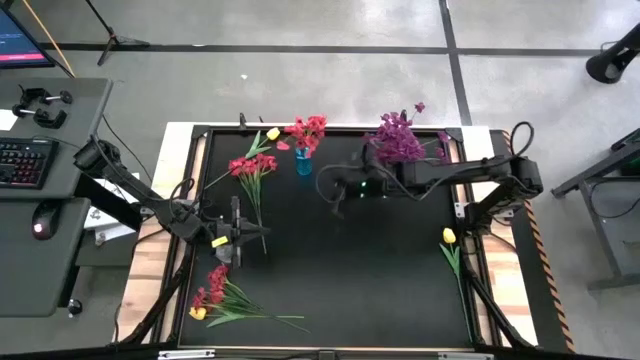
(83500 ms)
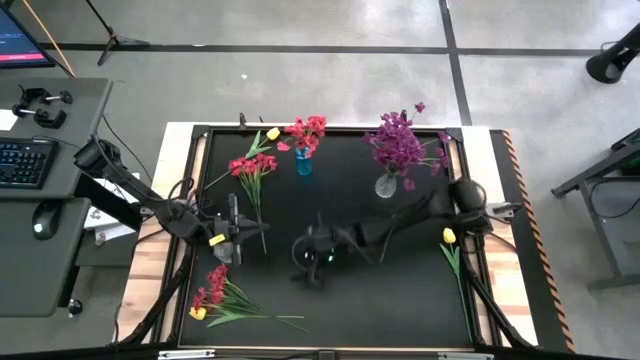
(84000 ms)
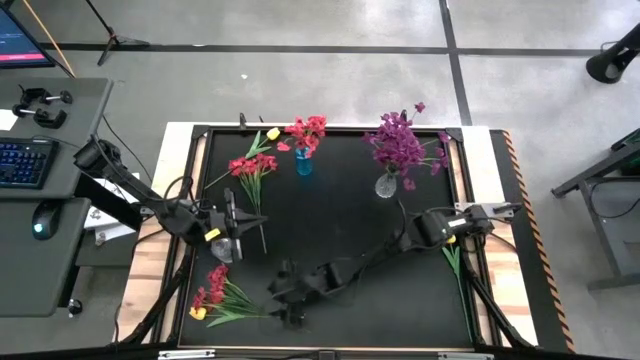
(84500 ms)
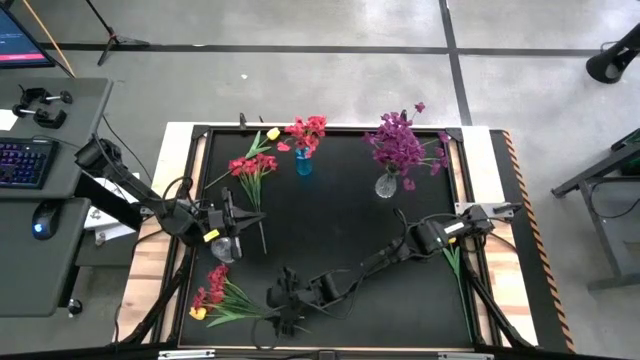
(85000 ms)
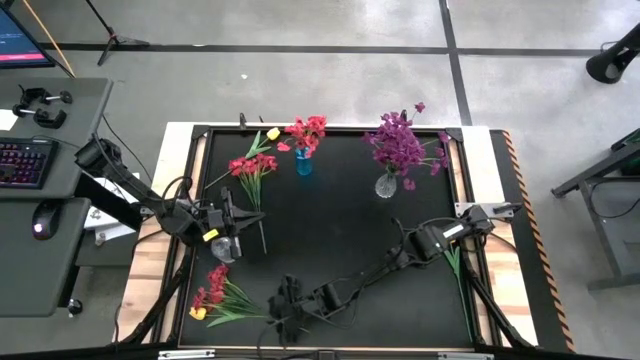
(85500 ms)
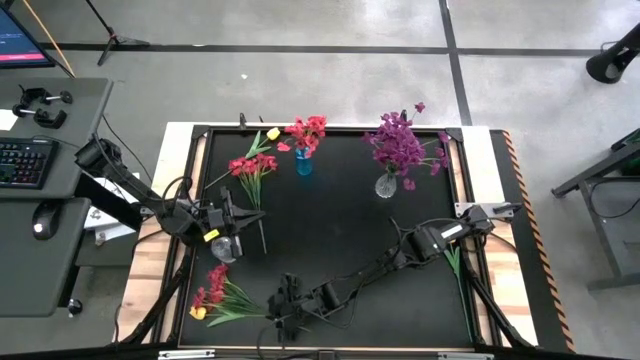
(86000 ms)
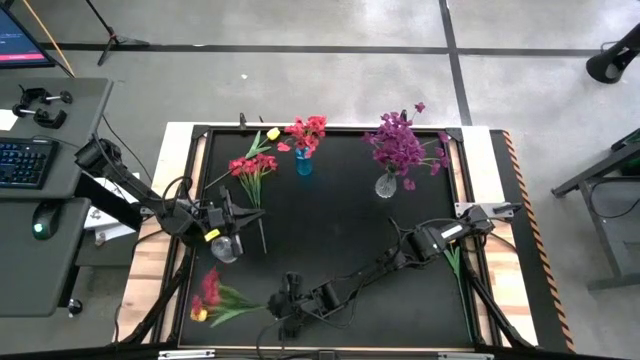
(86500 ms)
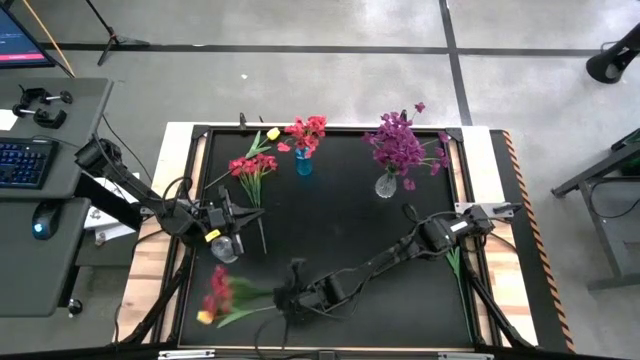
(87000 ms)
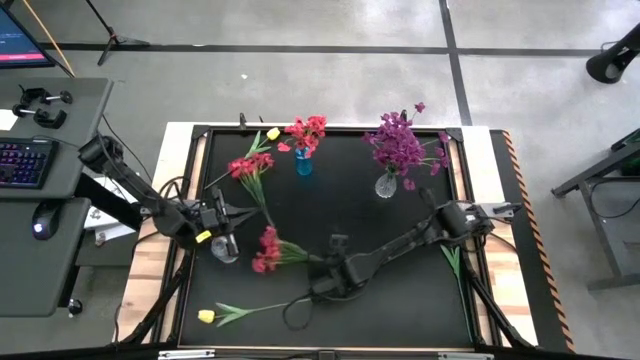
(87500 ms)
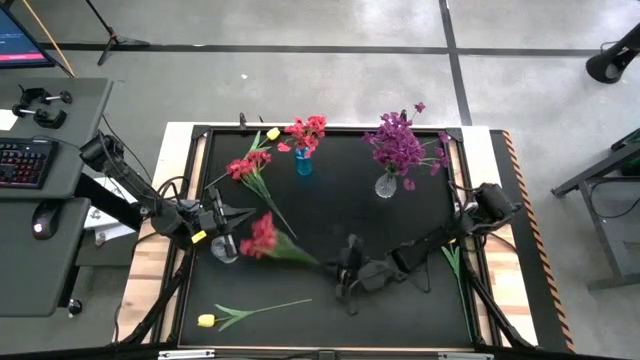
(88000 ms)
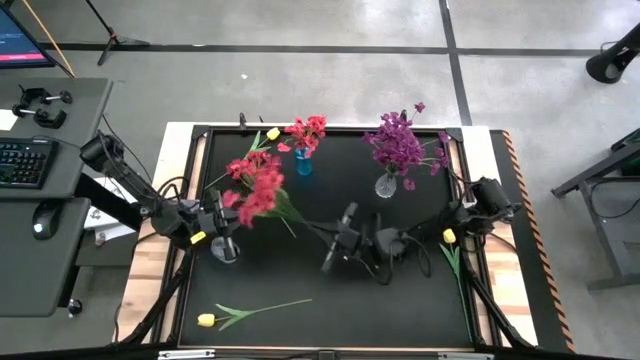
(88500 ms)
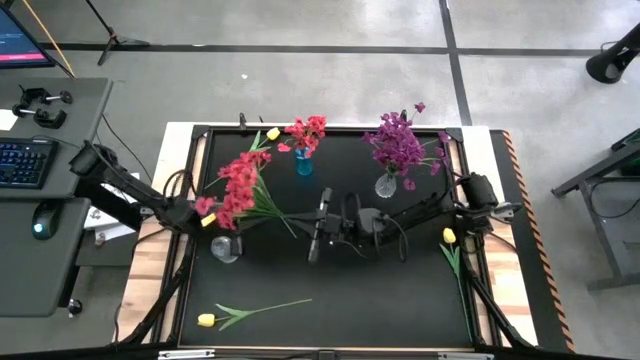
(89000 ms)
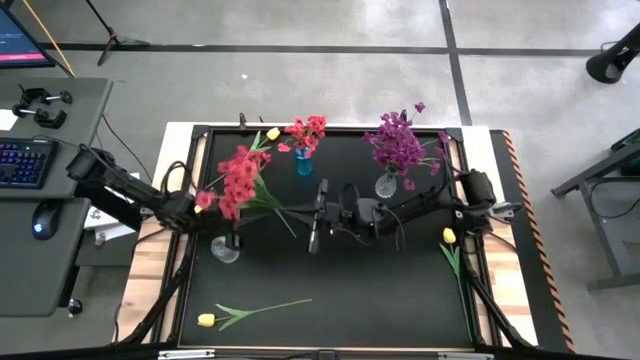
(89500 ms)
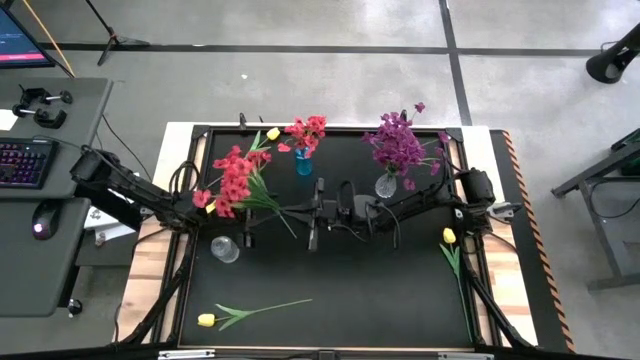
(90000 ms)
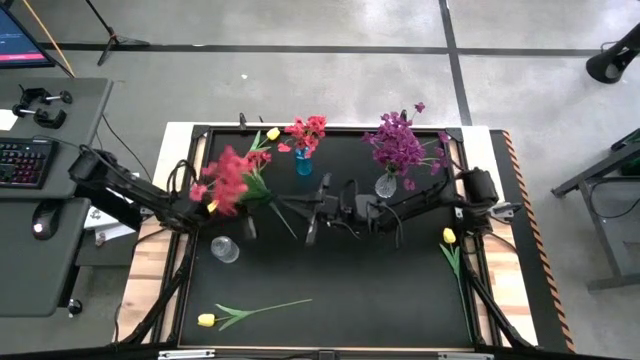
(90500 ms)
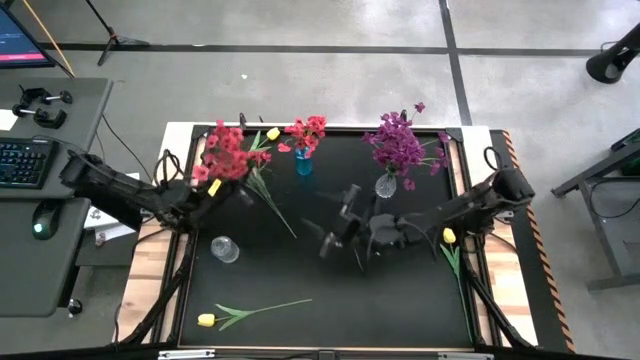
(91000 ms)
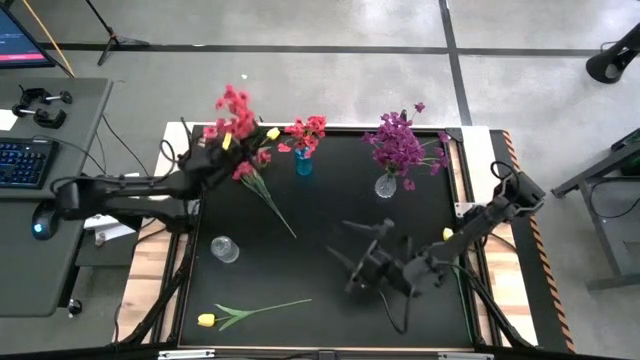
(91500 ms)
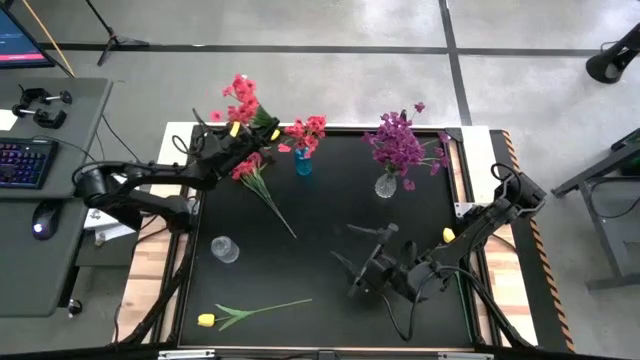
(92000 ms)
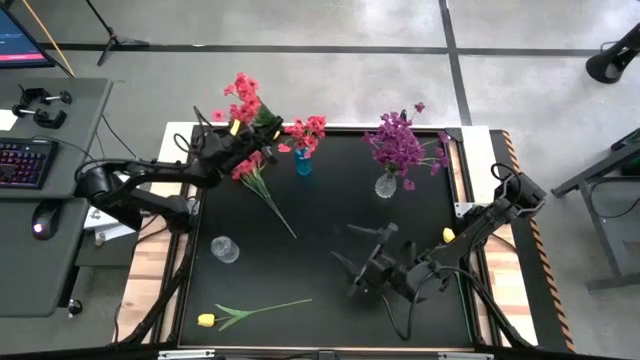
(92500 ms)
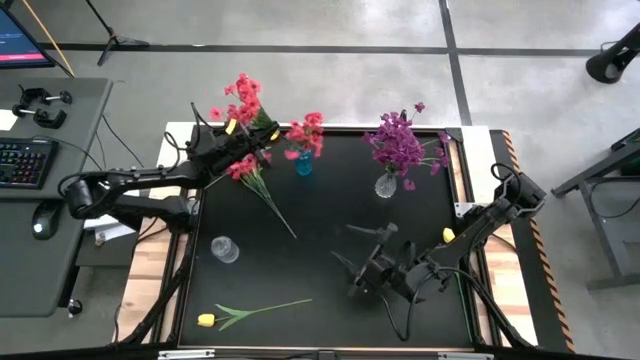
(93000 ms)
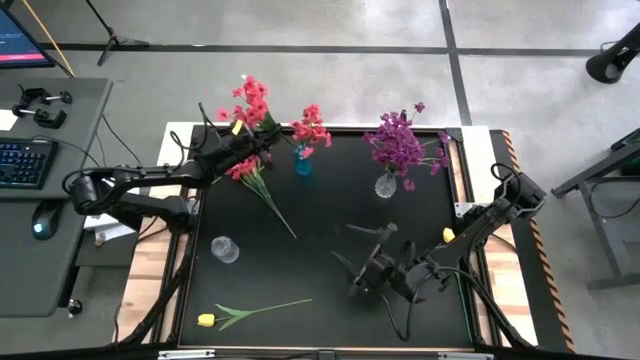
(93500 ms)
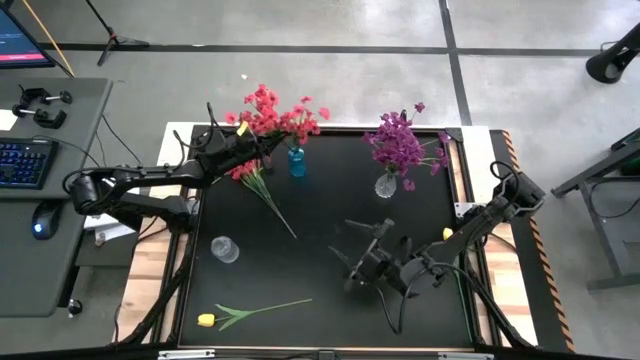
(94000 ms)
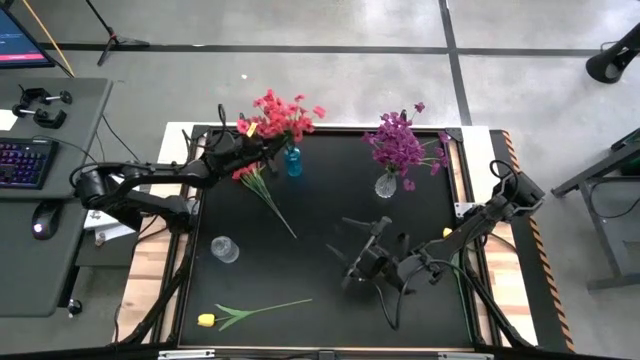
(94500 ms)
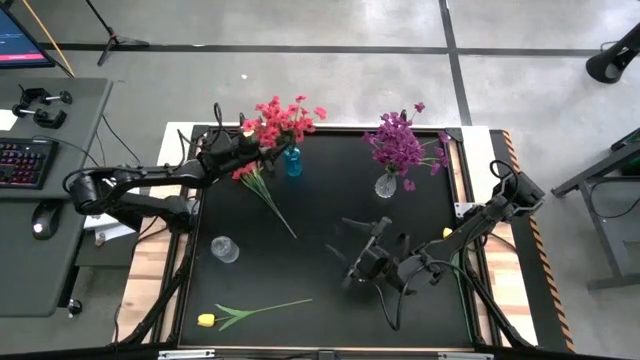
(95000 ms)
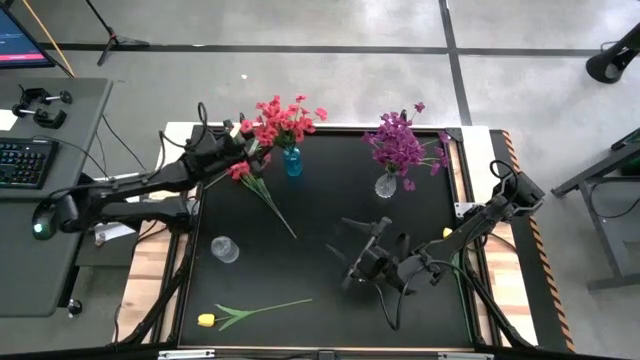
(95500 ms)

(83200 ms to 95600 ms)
Task: Sort flowers into vase by color
Put the bottom red flowers into the blue vase
